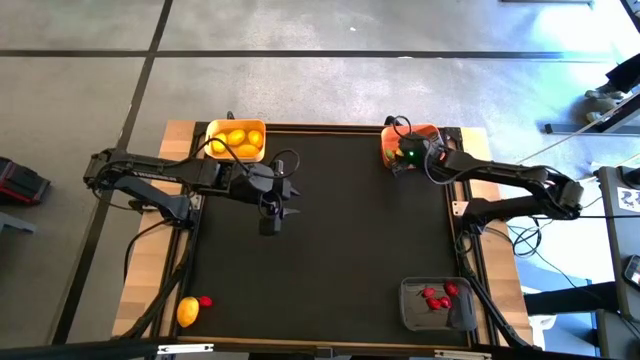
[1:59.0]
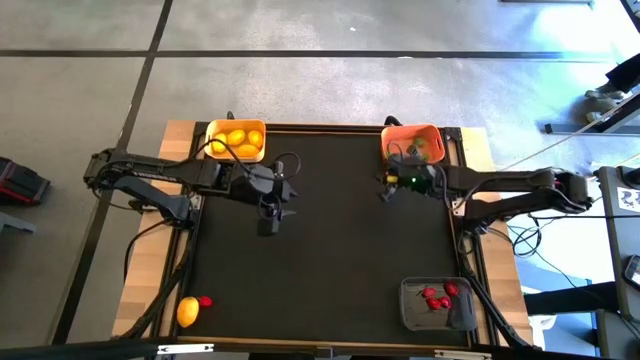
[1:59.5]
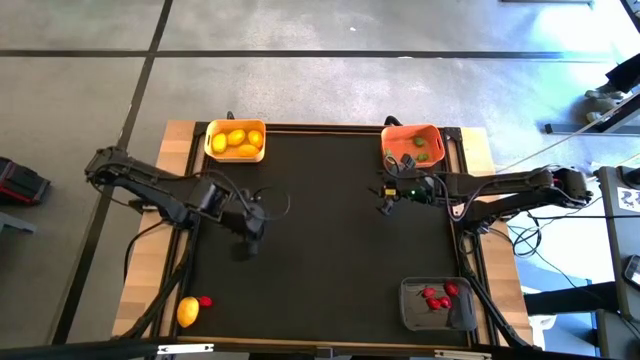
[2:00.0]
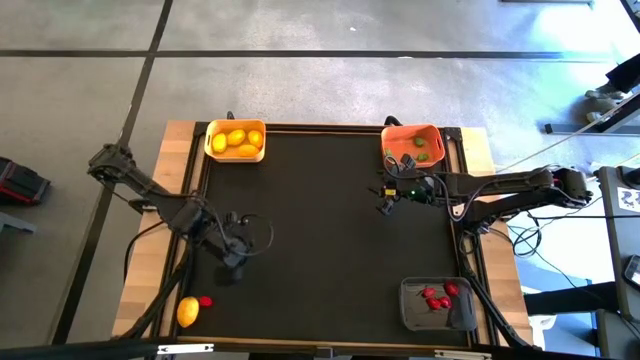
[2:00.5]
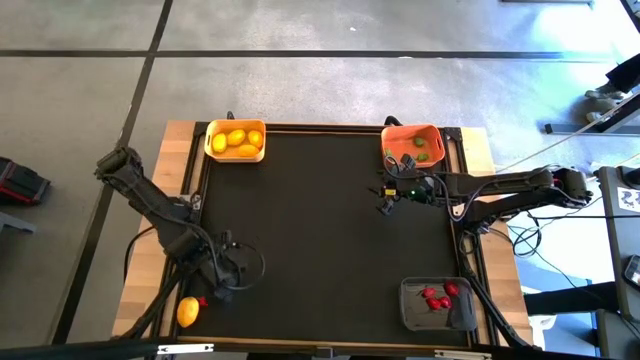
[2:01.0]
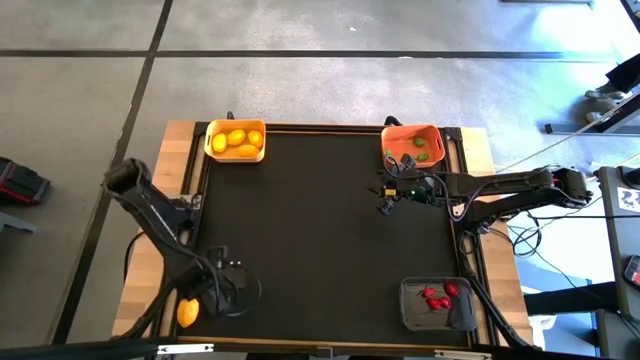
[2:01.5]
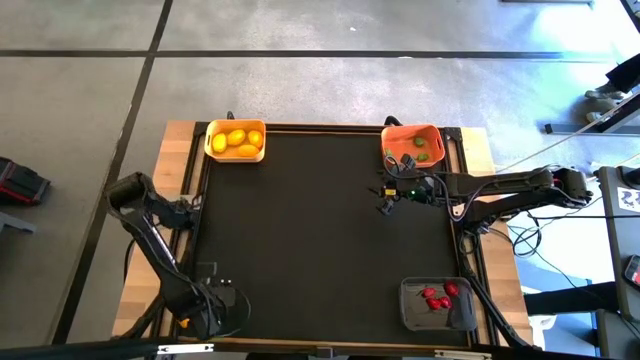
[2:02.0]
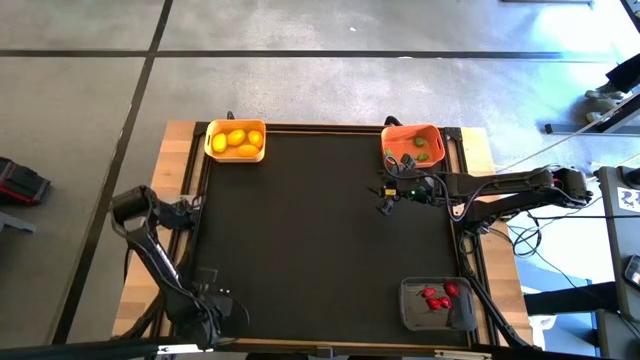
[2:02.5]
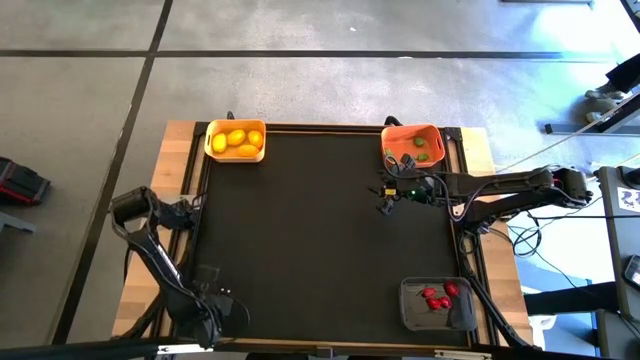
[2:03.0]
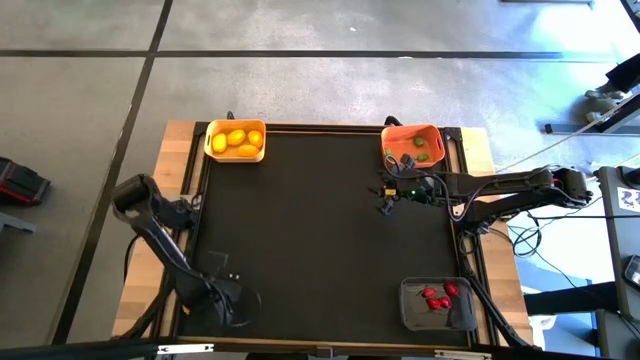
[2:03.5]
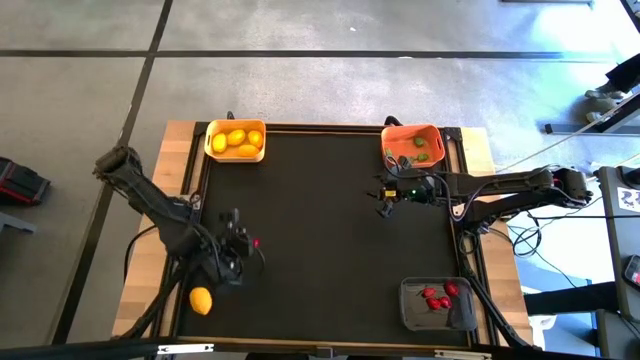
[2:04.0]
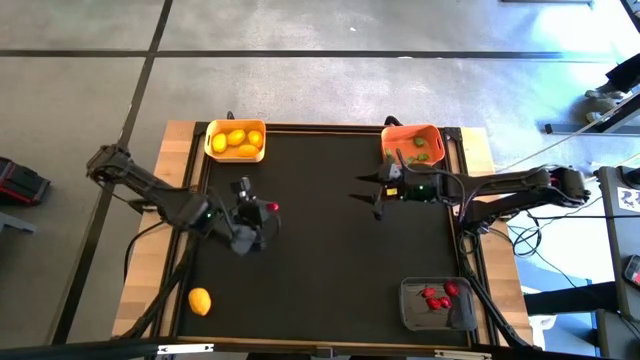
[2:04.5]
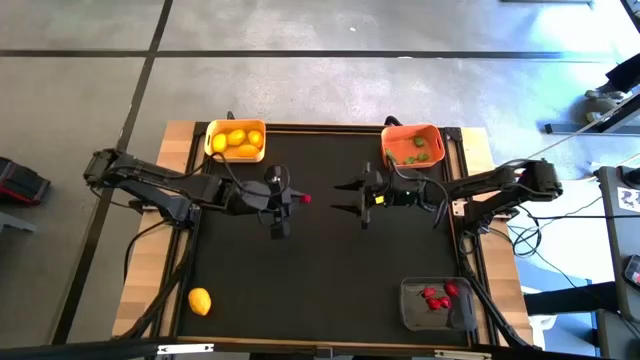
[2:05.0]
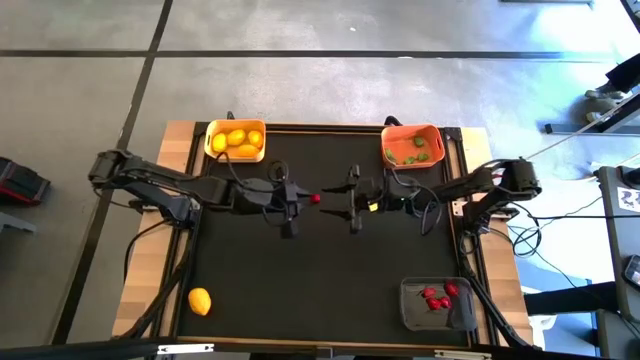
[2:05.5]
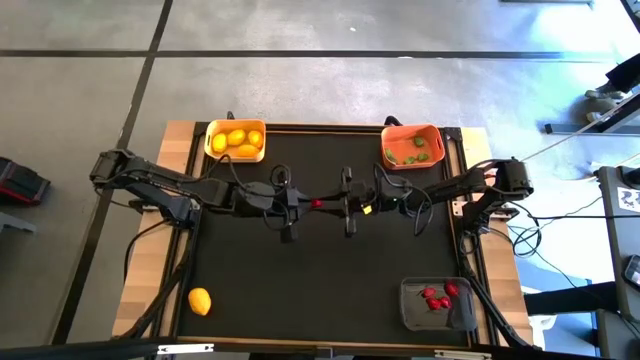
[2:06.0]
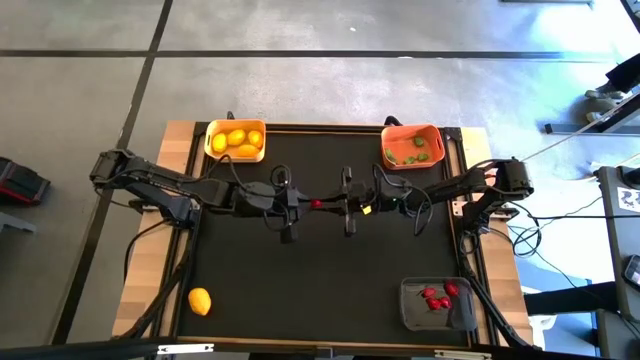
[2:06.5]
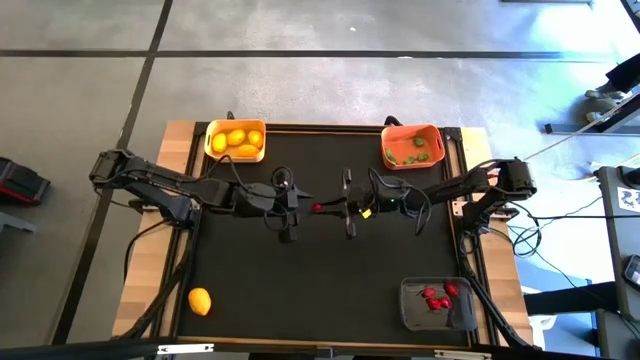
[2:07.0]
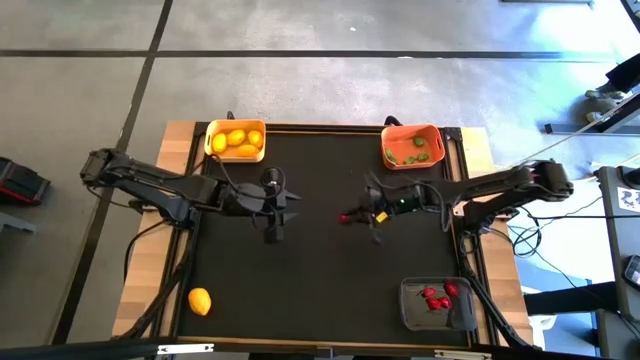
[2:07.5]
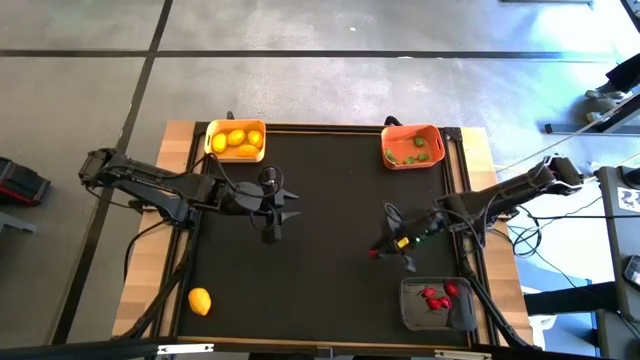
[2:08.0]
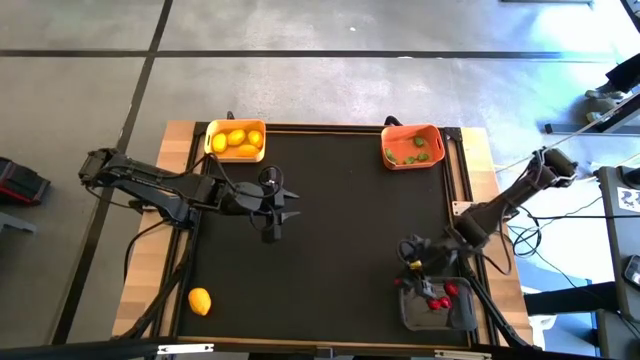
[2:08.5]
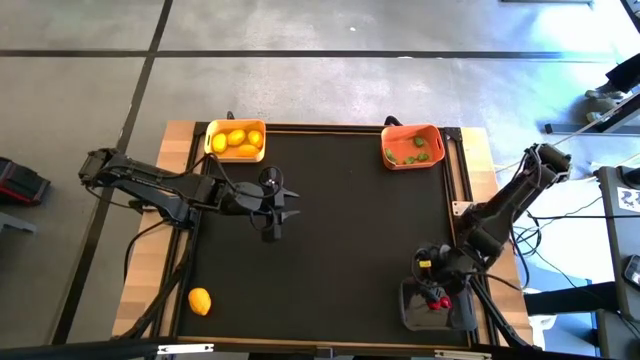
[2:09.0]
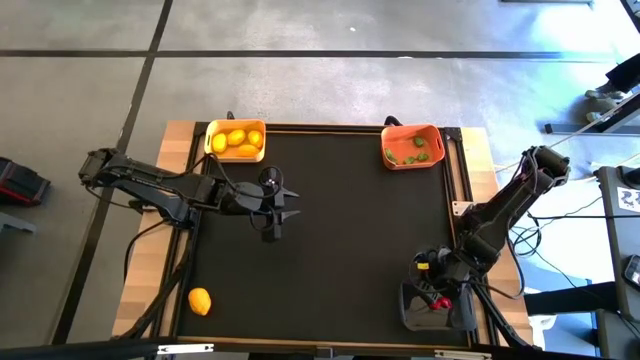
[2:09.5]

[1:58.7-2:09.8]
Task: Sort produce into baskets
Put the red chili pepper into the gray bin

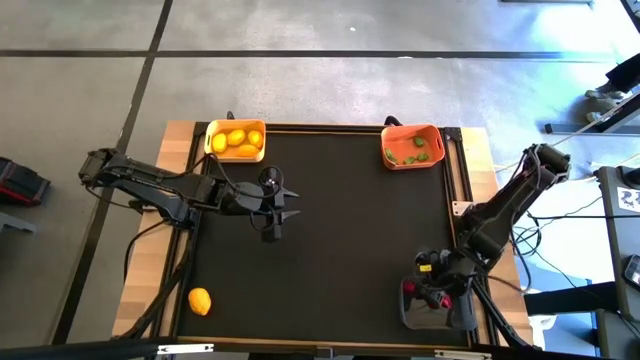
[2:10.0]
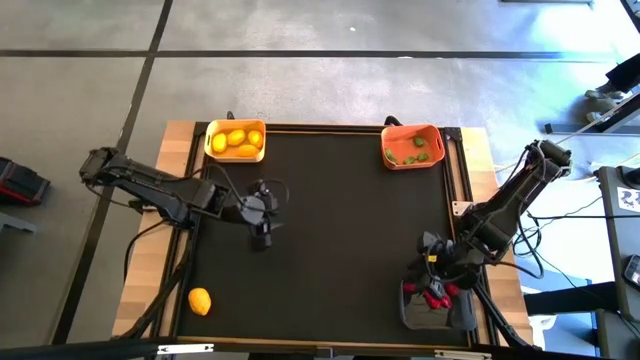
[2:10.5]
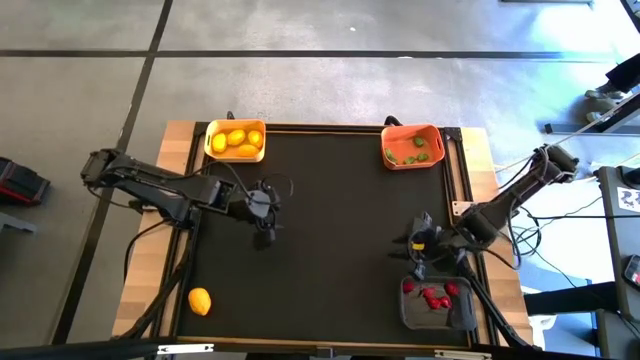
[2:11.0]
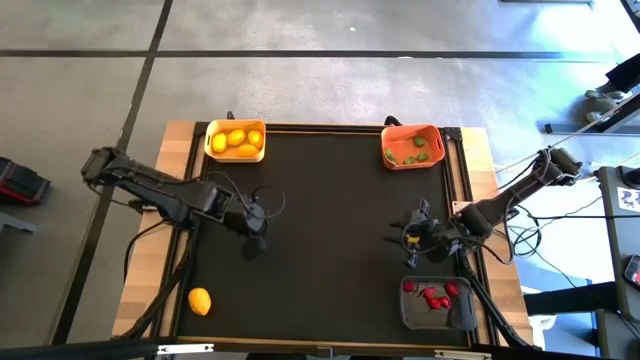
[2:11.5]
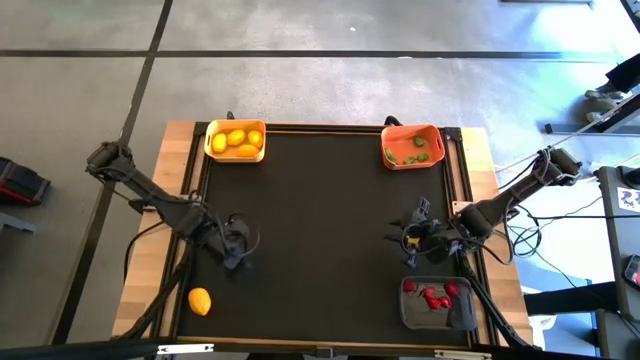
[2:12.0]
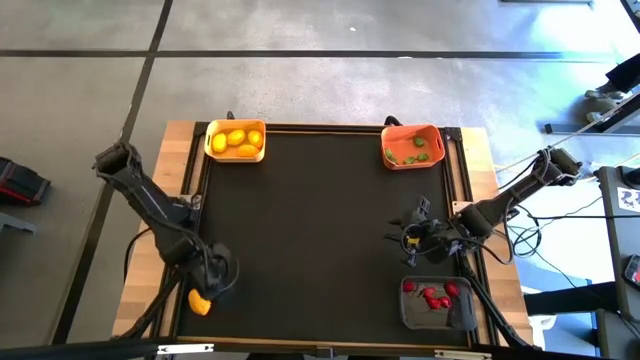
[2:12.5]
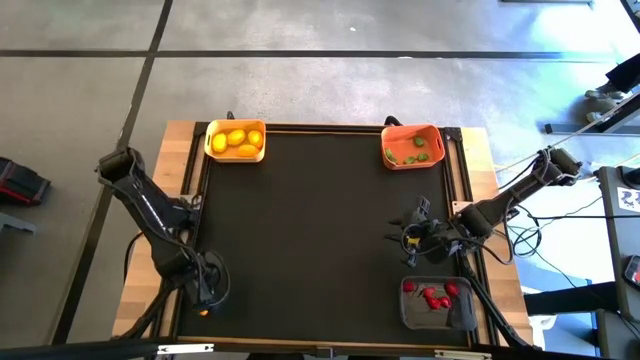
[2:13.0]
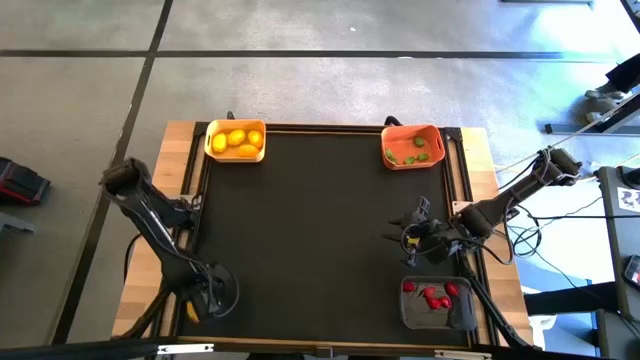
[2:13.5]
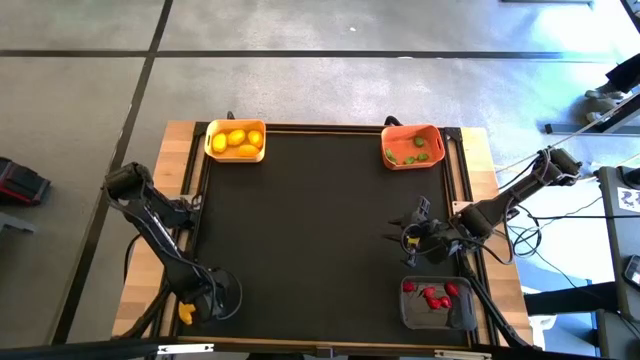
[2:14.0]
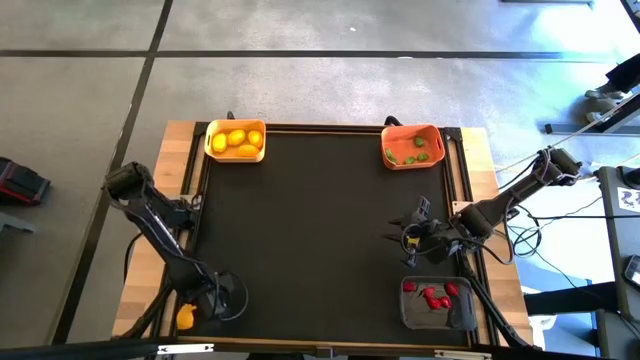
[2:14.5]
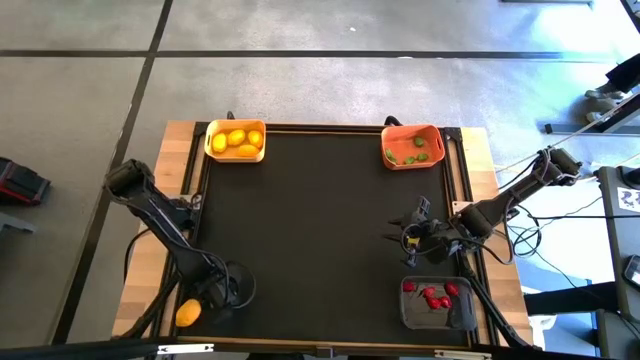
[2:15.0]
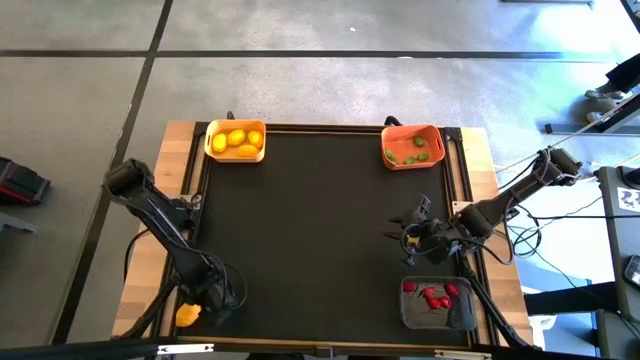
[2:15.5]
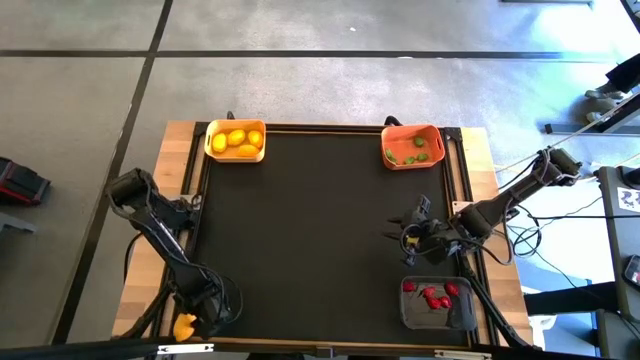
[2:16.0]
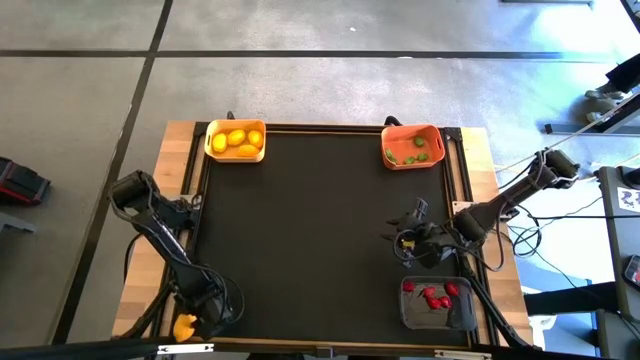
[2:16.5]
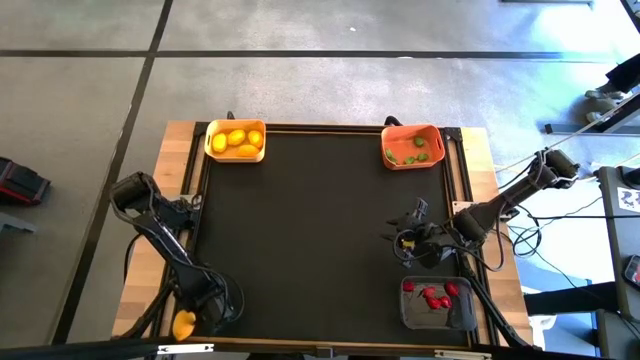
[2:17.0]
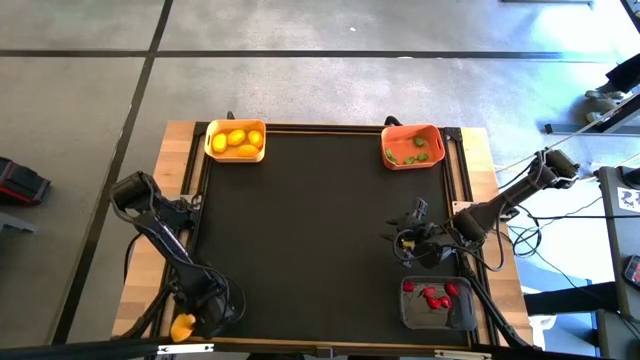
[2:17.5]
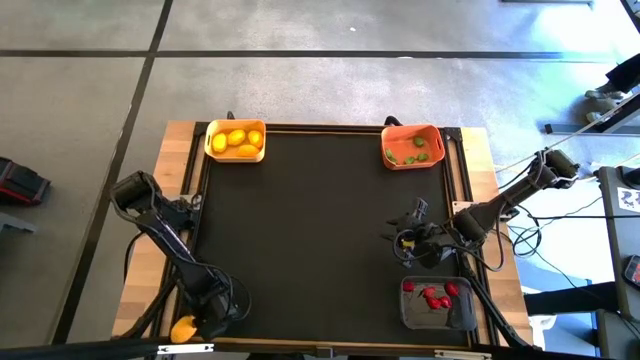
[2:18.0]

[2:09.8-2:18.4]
Put the lemon into the yellow bin

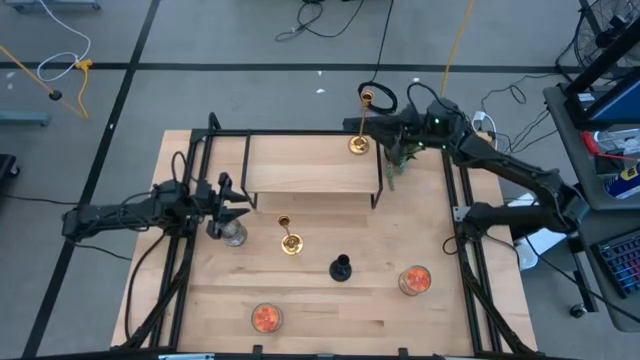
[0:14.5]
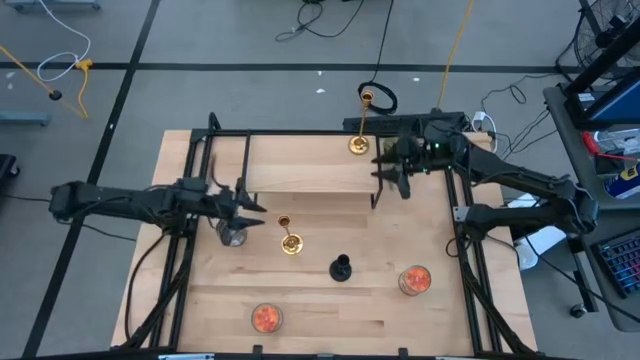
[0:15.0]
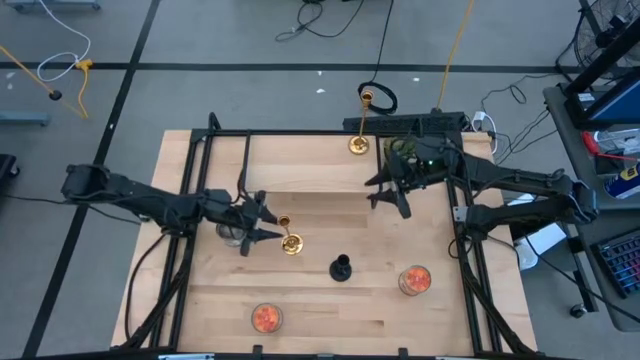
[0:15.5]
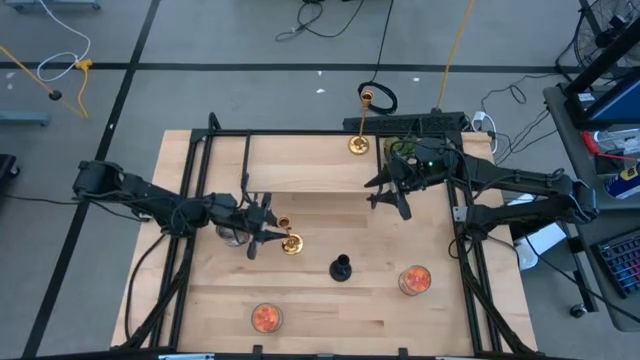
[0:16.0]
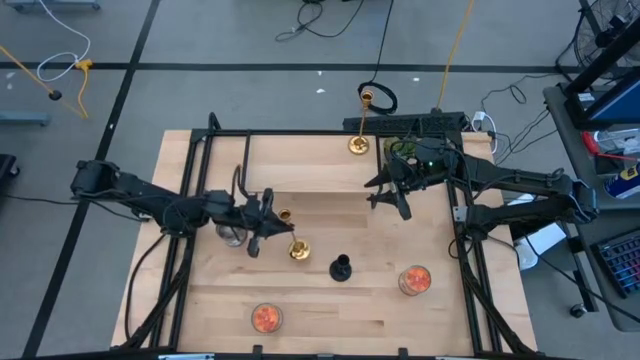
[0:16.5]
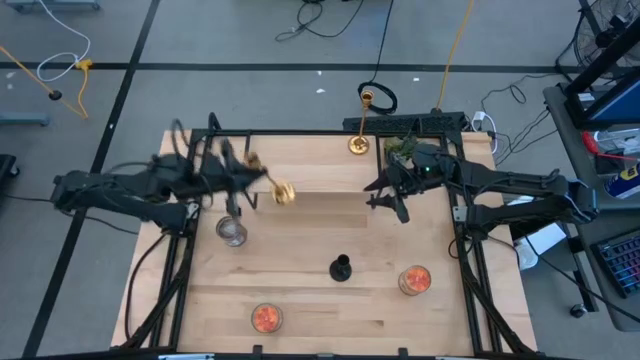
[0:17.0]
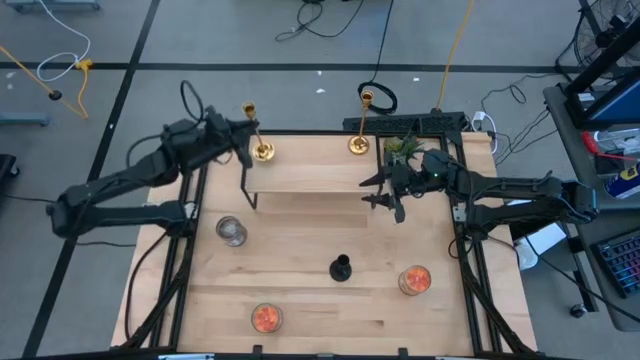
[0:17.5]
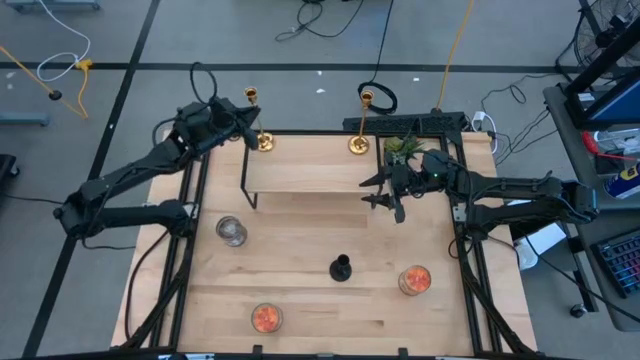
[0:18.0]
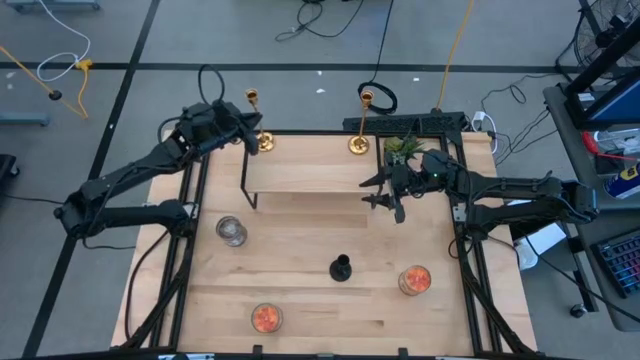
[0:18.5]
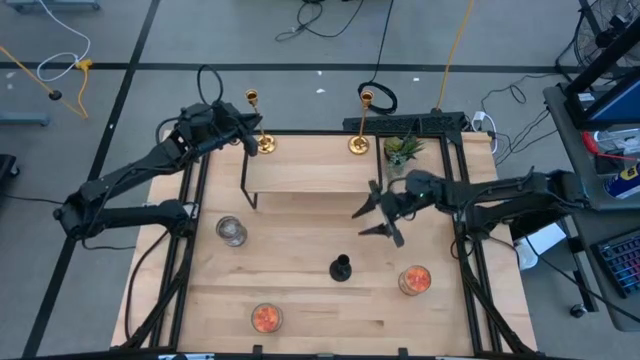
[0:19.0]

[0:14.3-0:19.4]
Task: Pick & Place candle stick holders
Put the gold candle holder on the shelf
